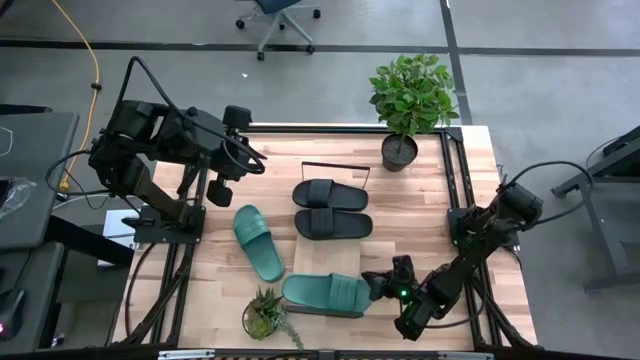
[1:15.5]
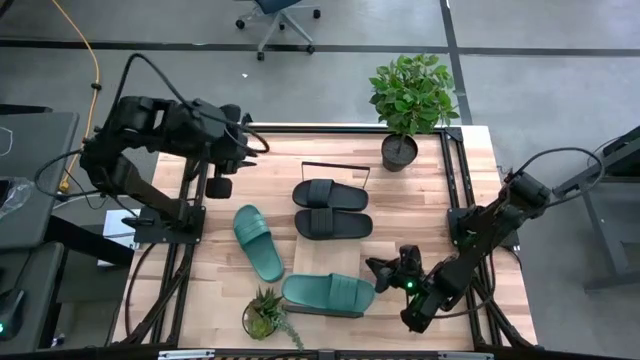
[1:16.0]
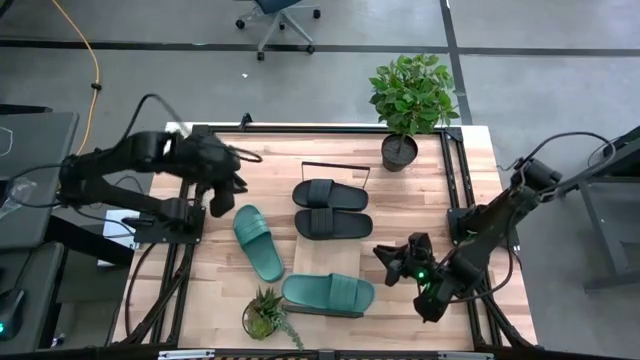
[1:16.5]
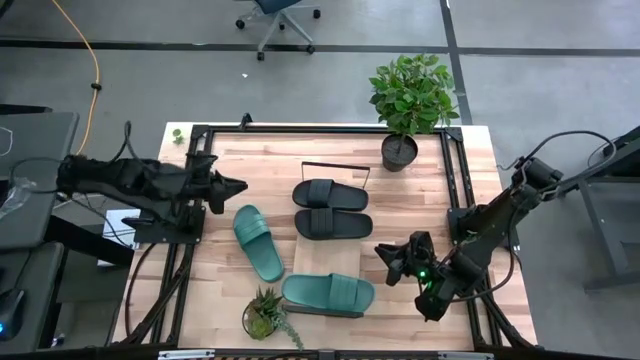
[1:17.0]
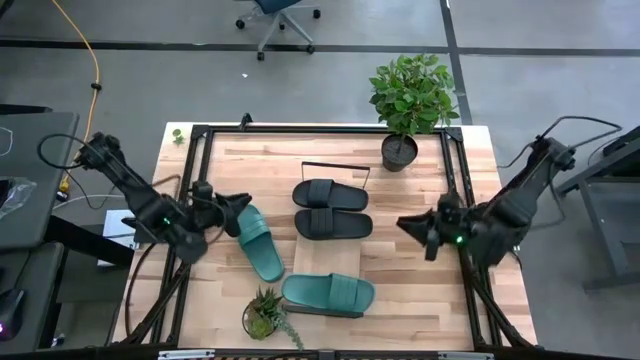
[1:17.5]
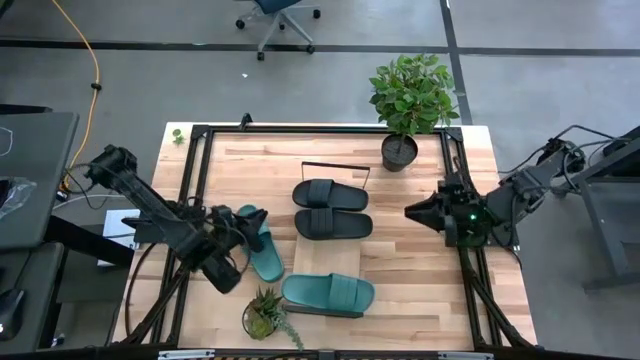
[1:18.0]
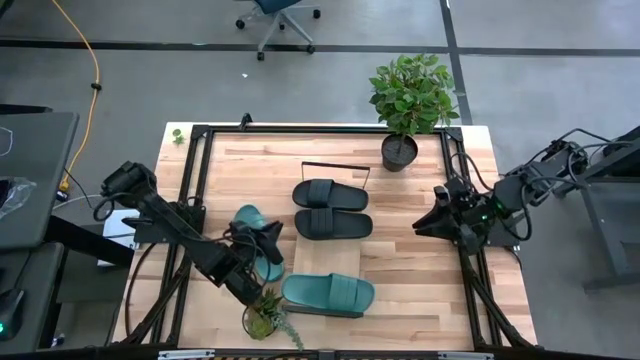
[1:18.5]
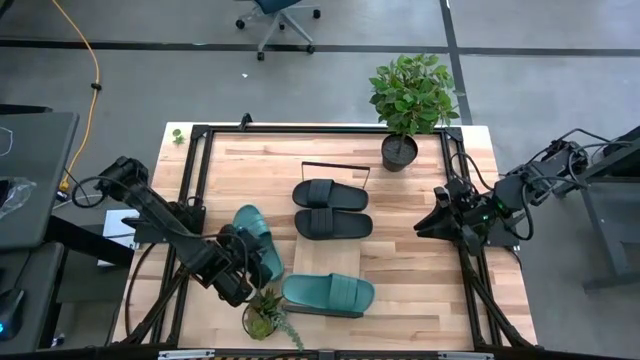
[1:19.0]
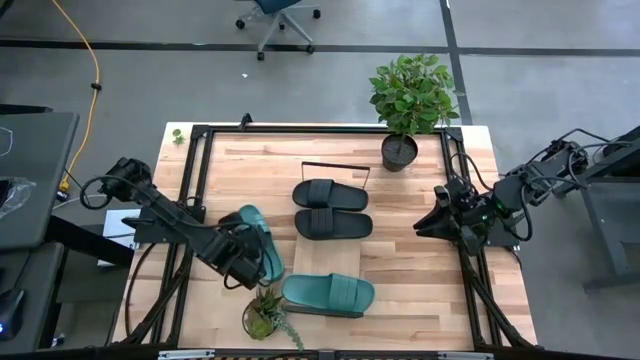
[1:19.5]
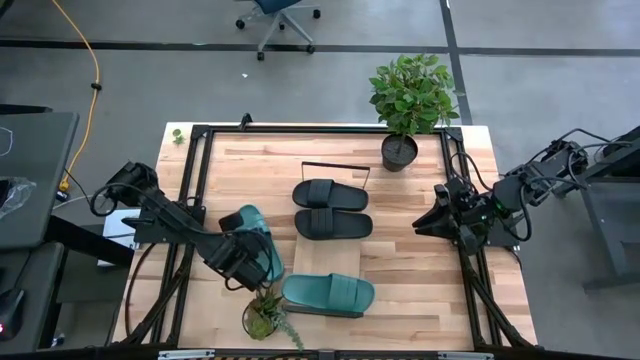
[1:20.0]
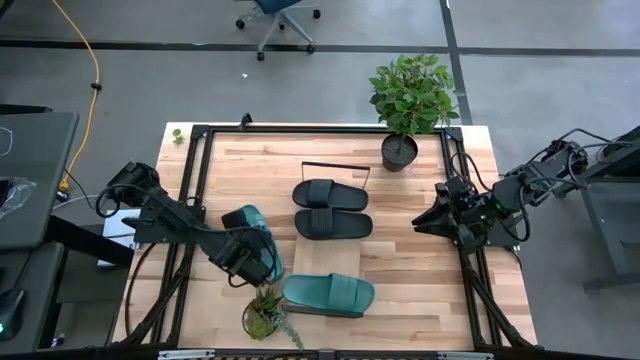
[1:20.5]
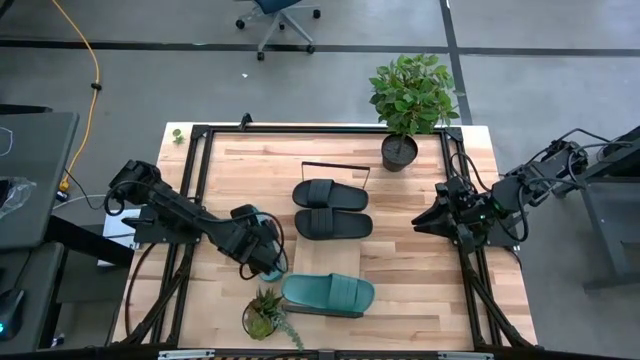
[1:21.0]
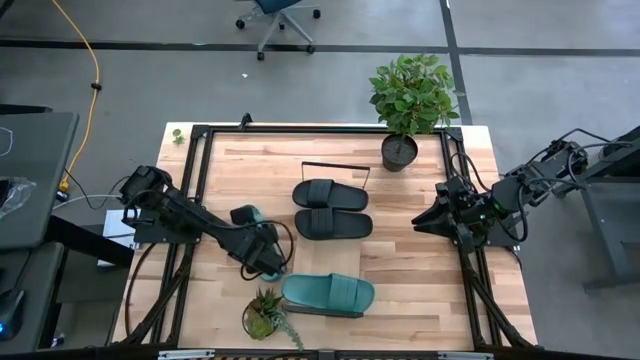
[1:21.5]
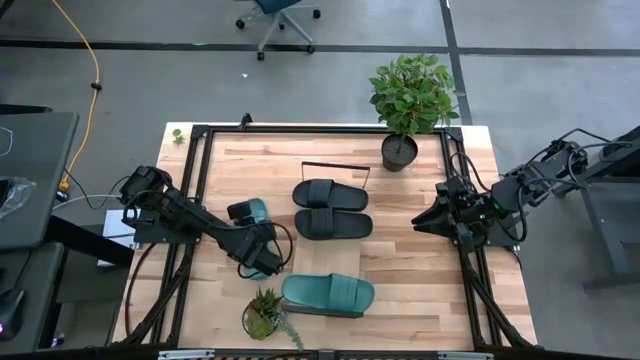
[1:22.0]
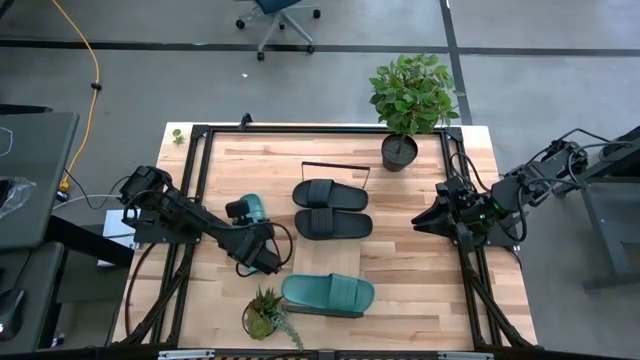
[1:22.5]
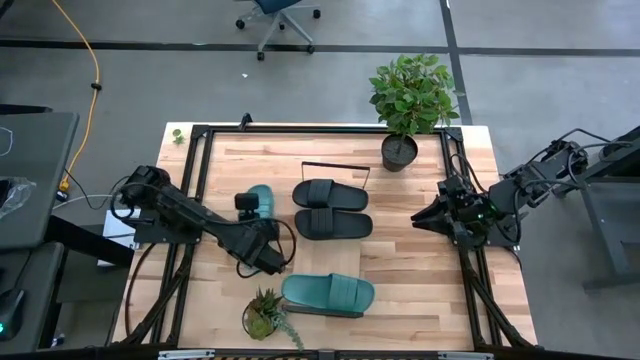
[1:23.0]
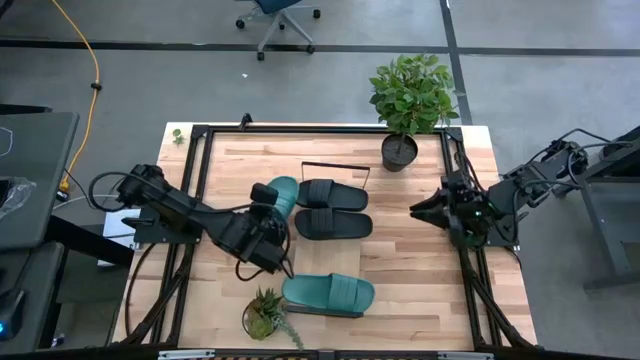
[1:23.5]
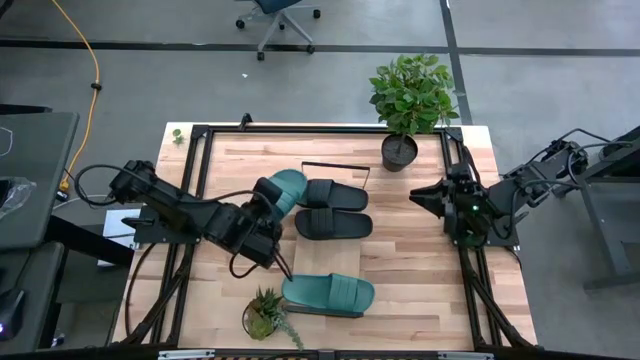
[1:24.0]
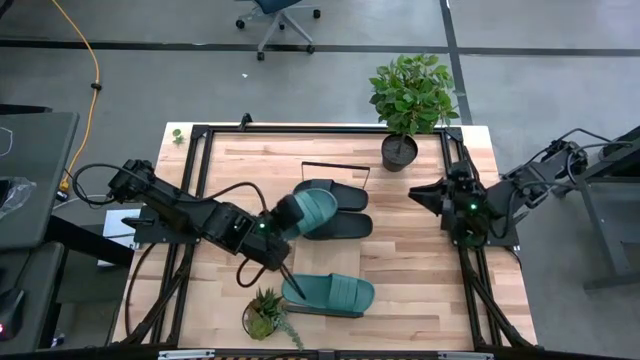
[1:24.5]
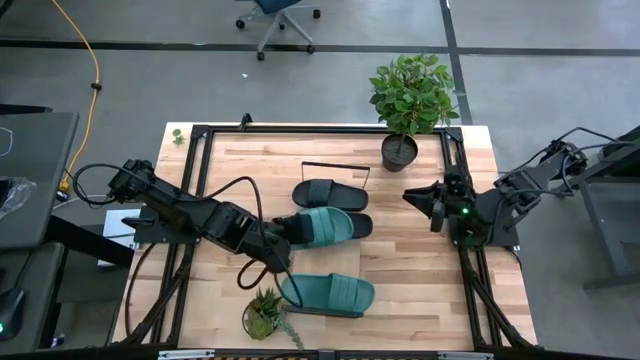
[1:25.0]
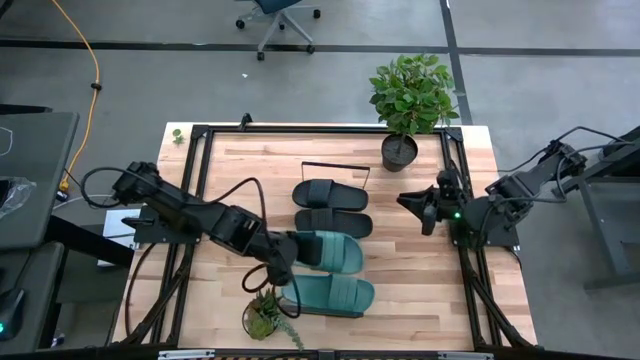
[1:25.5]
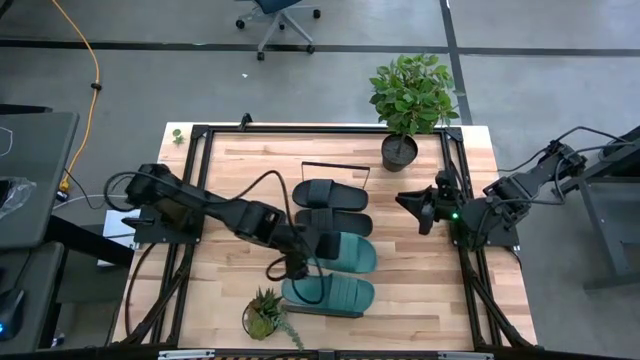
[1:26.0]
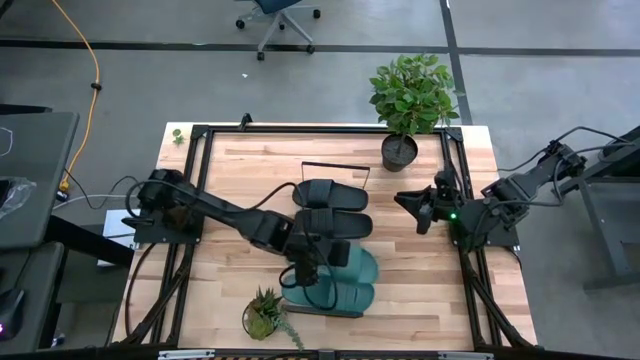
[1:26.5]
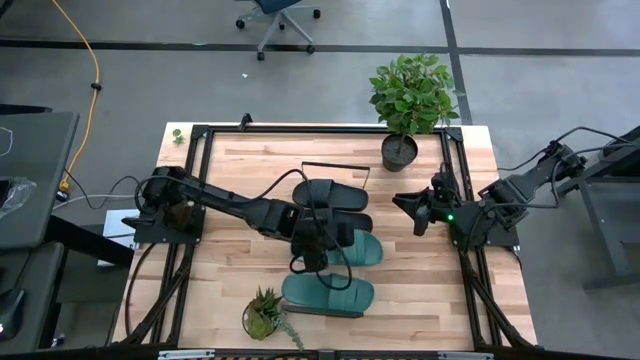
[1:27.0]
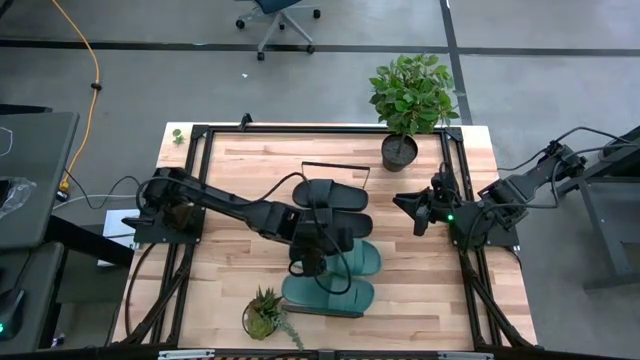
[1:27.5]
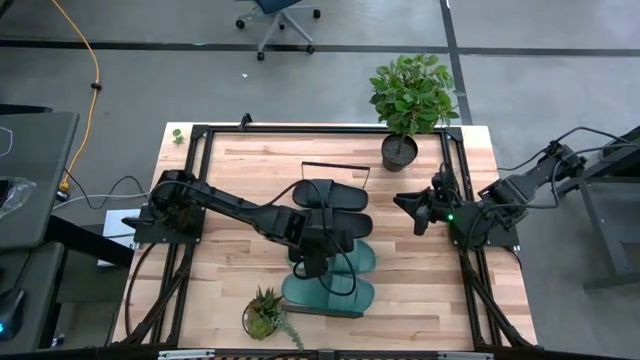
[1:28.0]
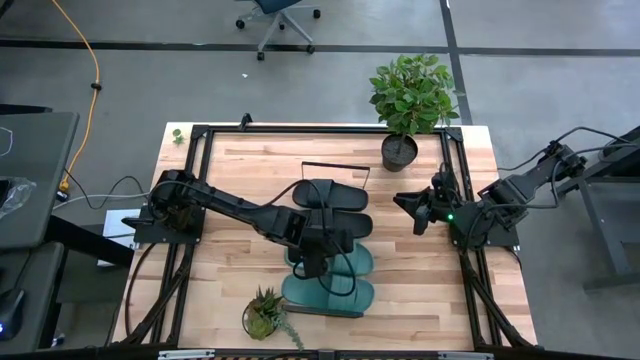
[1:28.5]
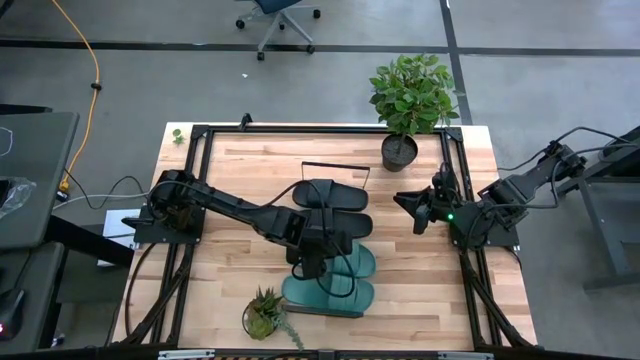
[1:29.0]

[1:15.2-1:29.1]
Task: Pick and place slides into the shelf
Put the green slides on the shelf

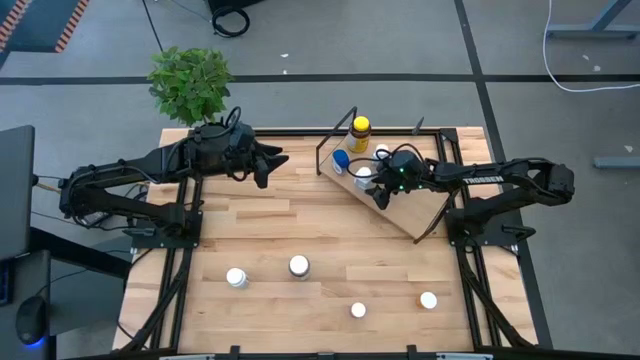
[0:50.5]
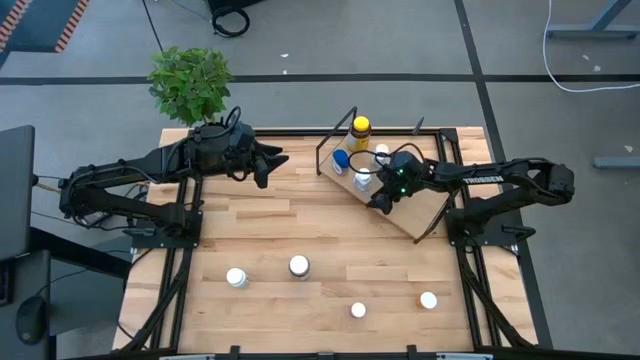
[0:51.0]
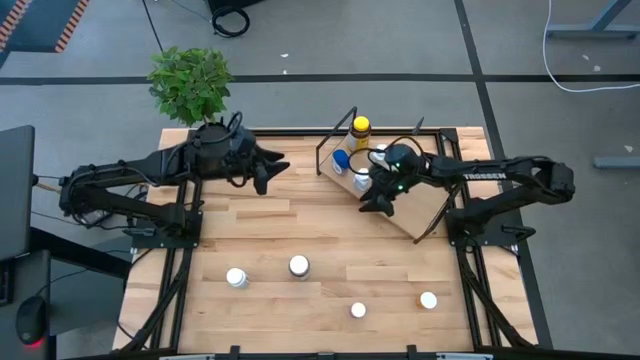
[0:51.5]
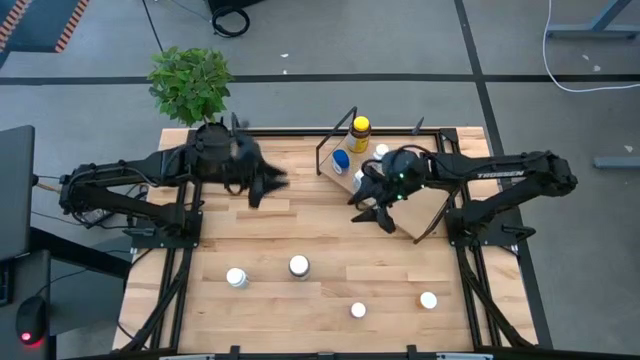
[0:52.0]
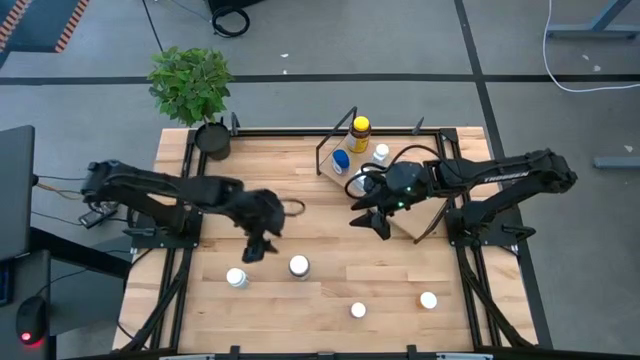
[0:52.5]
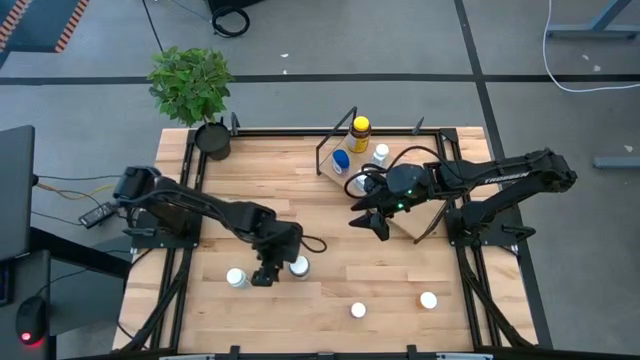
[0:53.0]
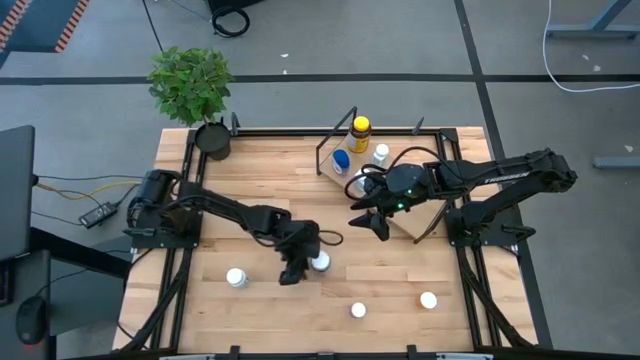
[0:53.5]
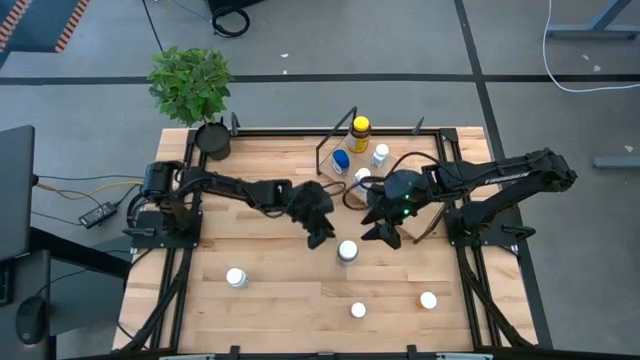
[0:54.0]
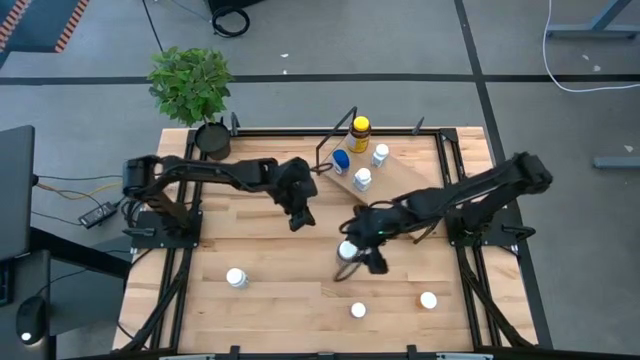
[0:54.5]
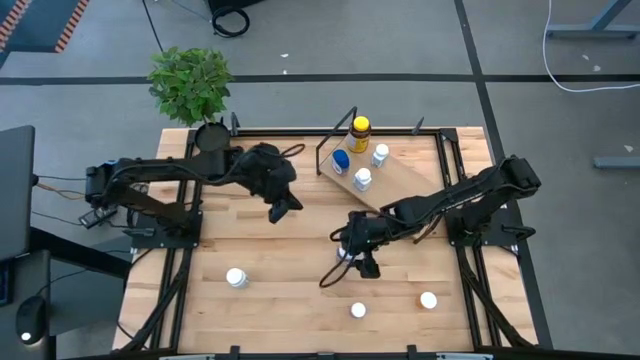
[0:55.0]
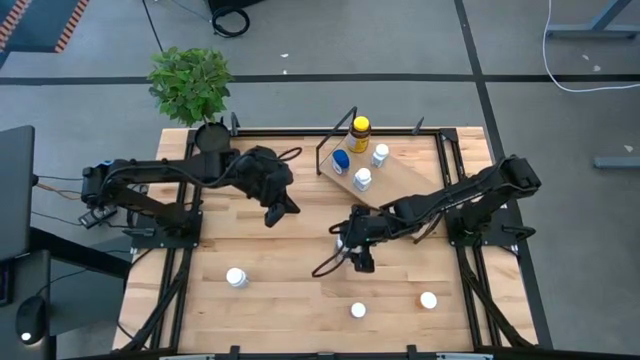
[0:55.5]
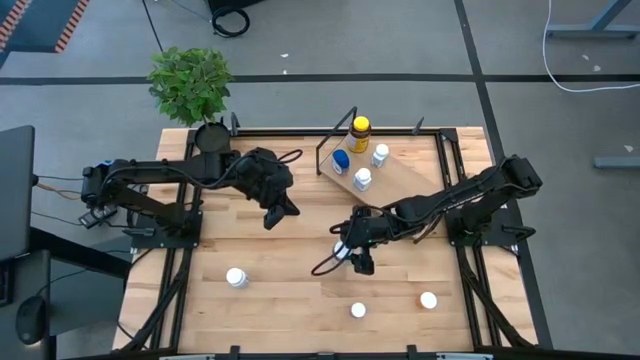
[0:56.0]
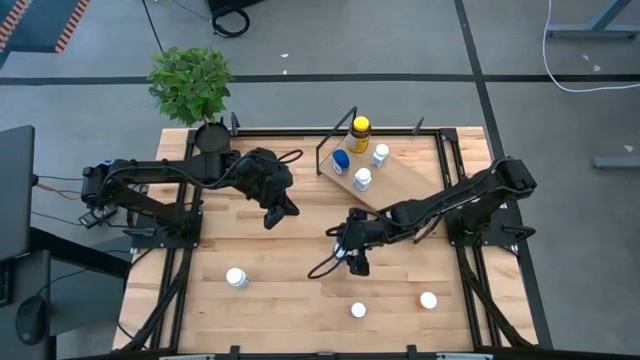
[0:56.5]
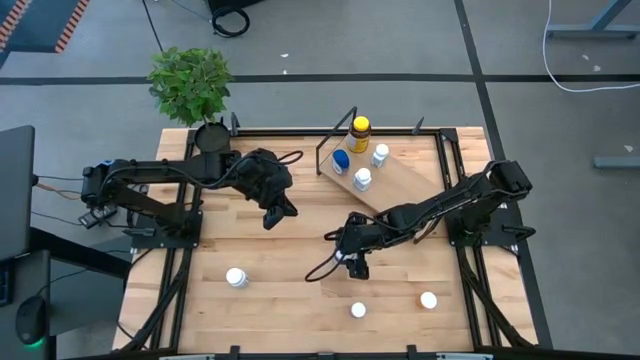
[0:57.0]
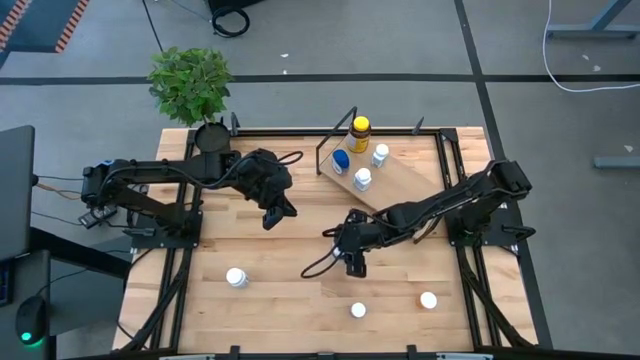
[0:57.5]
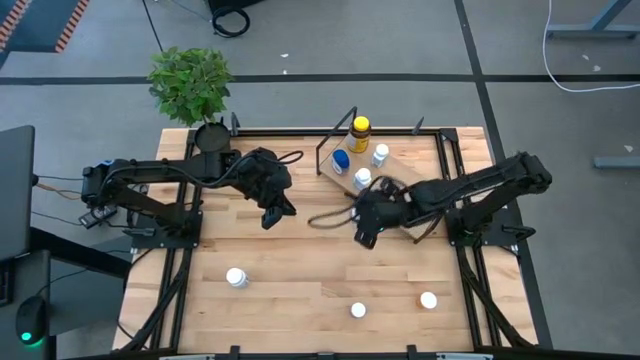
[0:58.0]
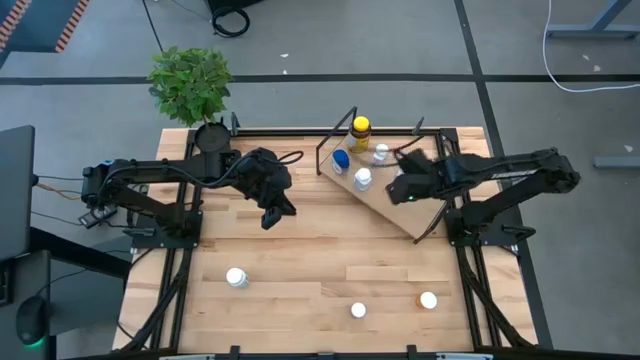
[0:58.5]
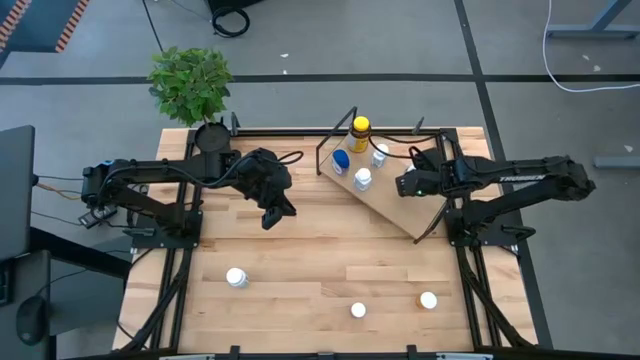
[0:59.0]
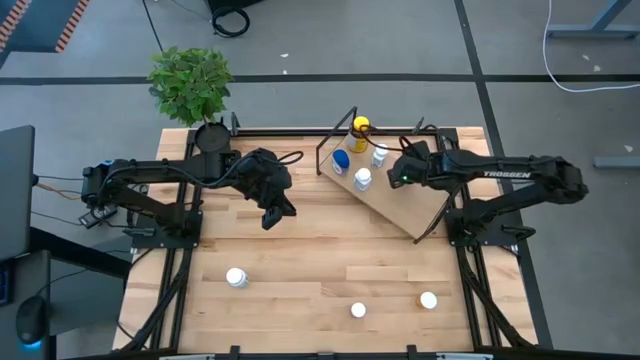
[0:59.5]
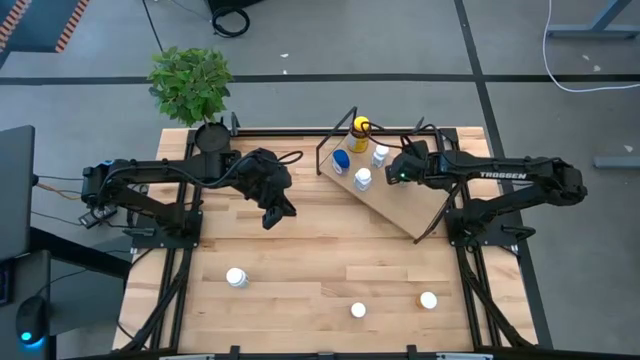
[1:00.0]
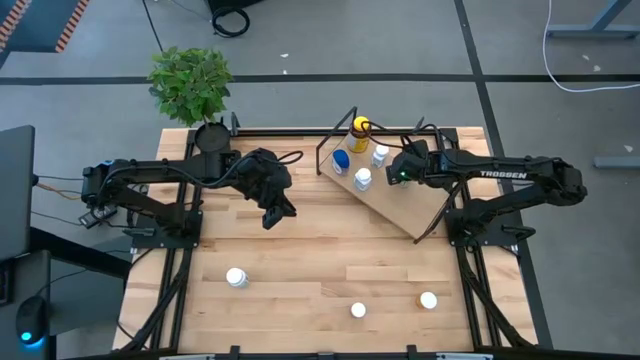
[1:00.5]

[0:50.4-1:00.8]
Task: Pick and place medicine bottles onto shelf by color
Put the green medicine bottle on the shelf
